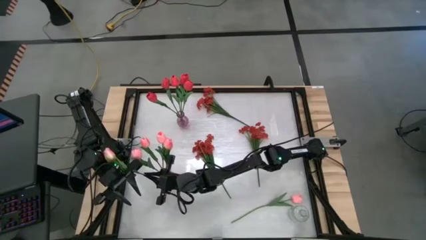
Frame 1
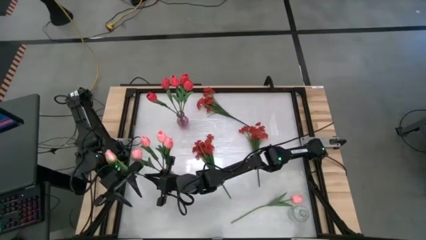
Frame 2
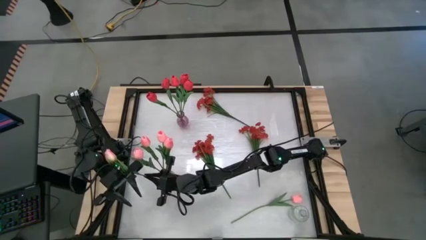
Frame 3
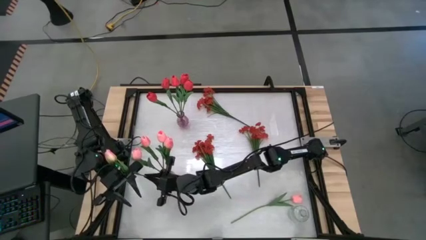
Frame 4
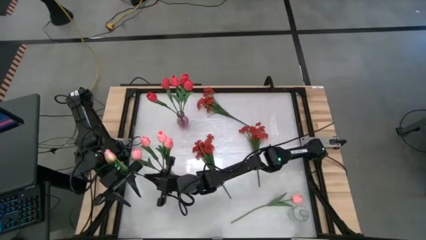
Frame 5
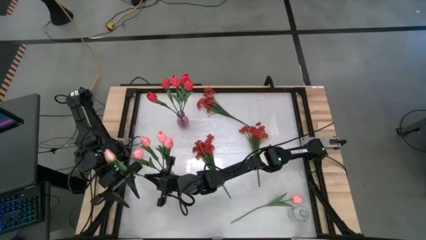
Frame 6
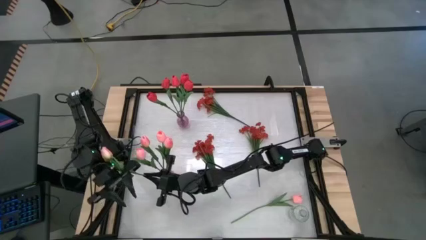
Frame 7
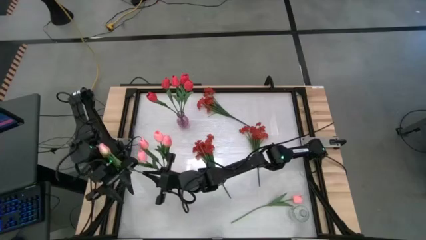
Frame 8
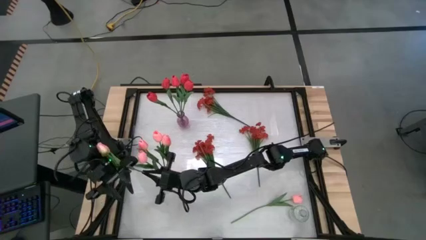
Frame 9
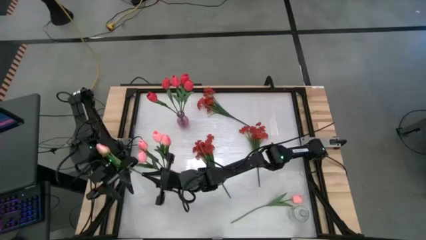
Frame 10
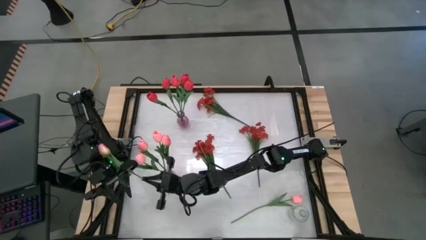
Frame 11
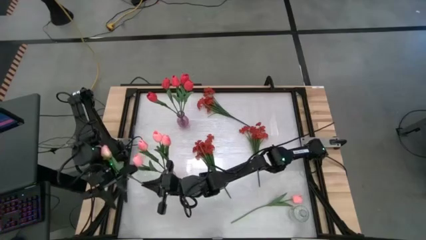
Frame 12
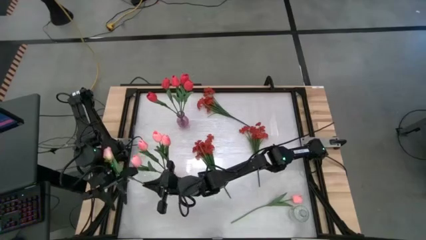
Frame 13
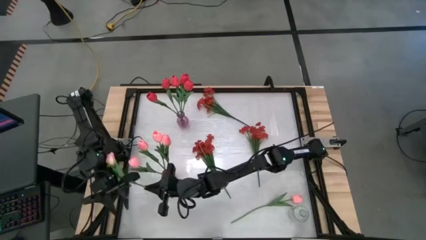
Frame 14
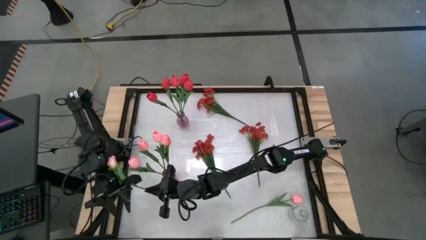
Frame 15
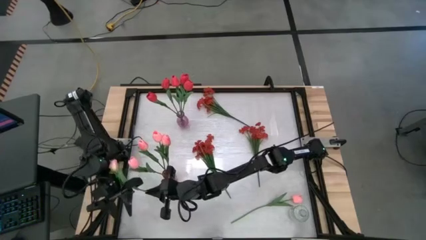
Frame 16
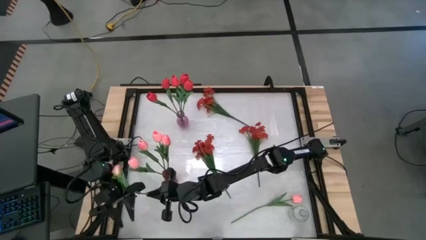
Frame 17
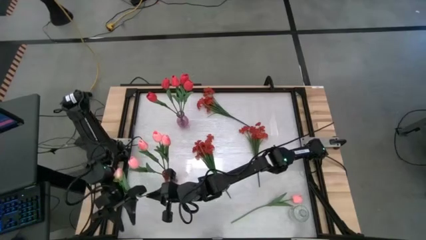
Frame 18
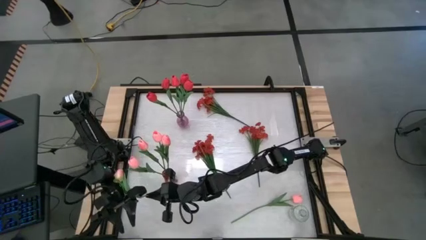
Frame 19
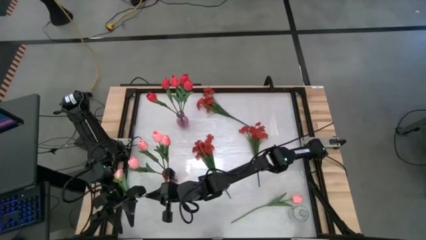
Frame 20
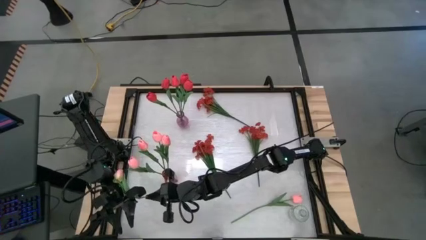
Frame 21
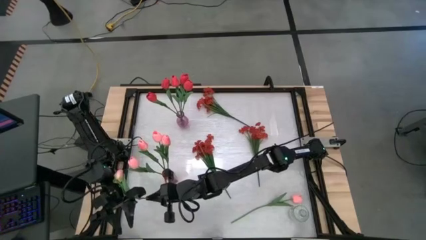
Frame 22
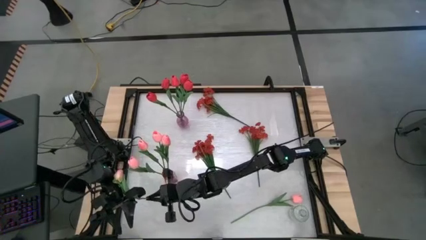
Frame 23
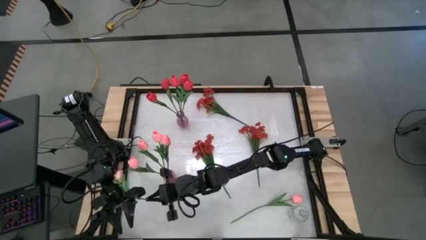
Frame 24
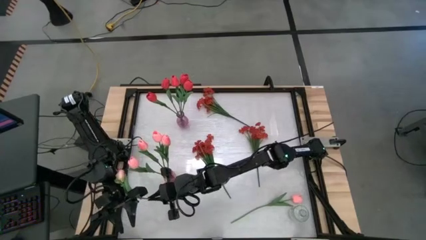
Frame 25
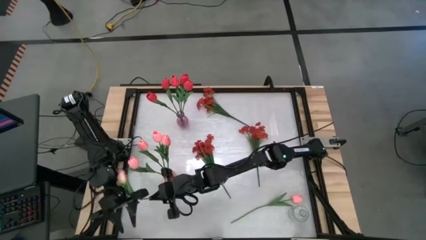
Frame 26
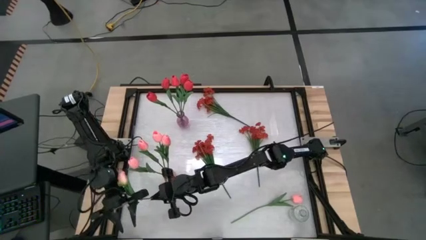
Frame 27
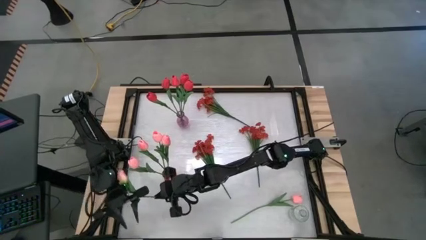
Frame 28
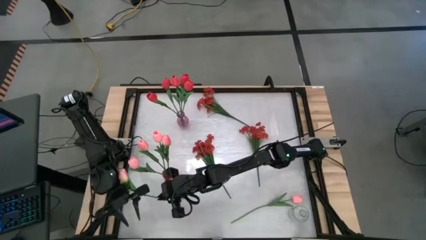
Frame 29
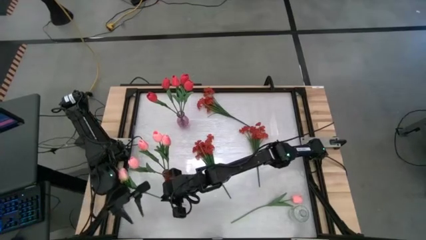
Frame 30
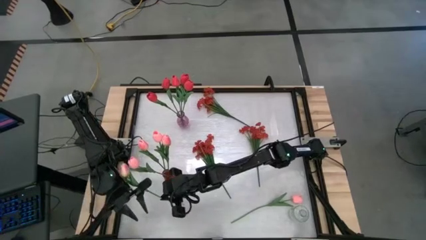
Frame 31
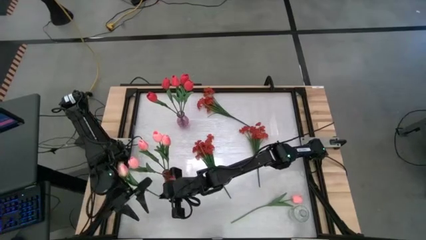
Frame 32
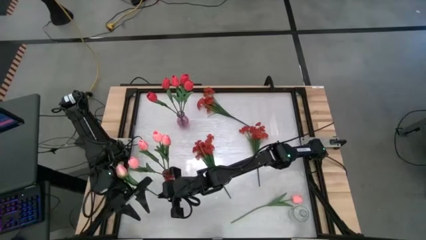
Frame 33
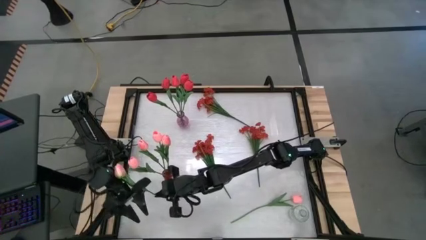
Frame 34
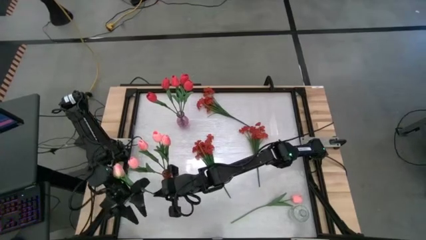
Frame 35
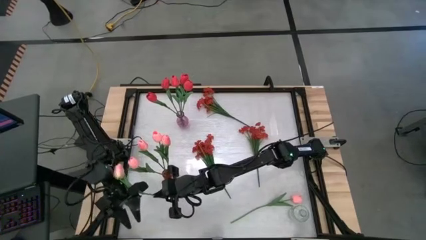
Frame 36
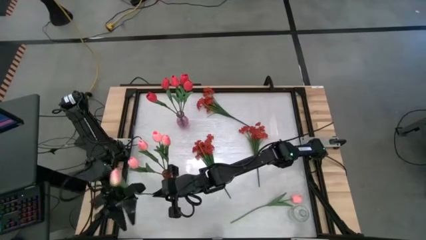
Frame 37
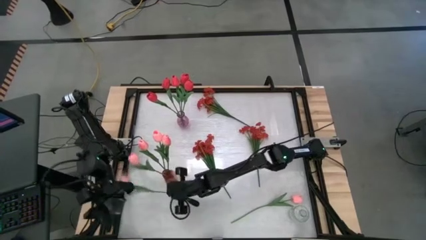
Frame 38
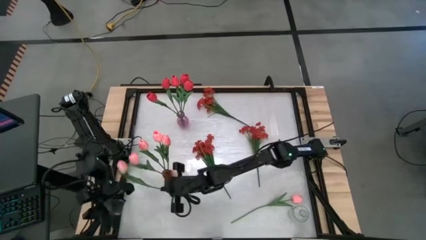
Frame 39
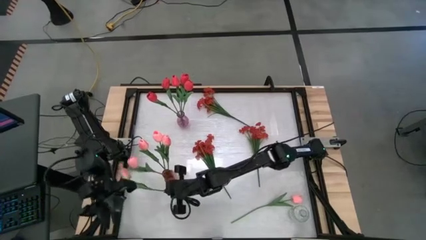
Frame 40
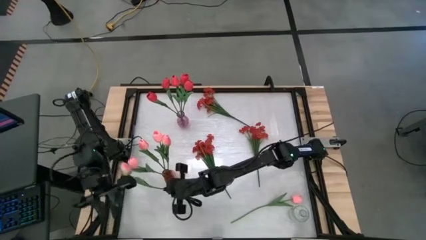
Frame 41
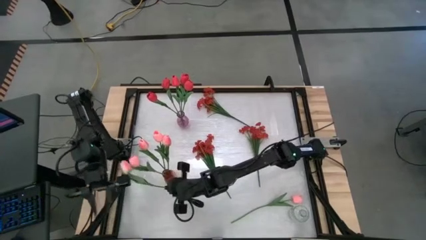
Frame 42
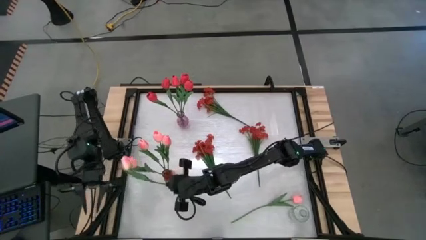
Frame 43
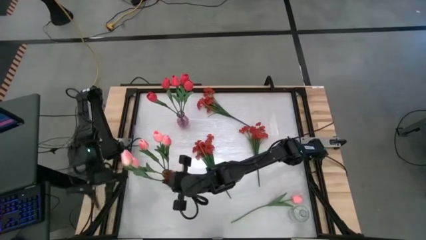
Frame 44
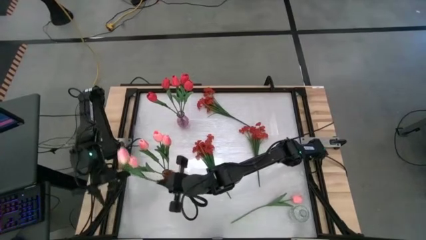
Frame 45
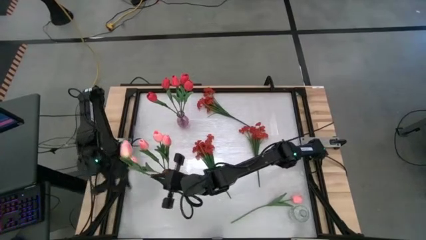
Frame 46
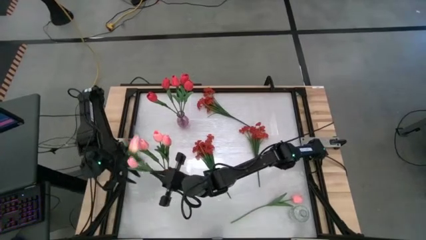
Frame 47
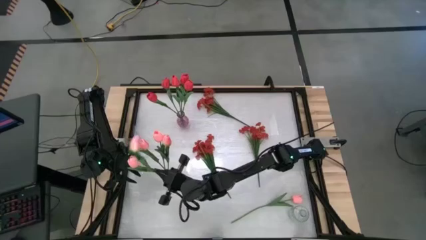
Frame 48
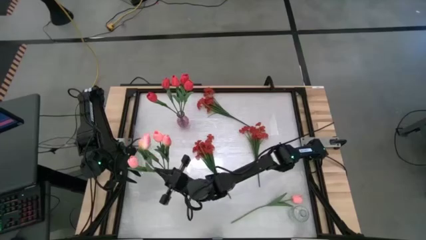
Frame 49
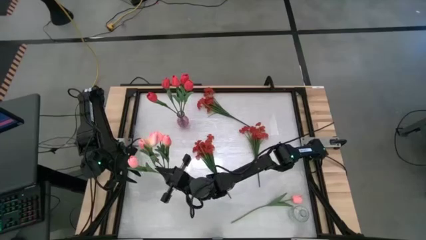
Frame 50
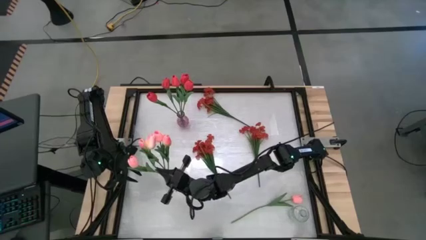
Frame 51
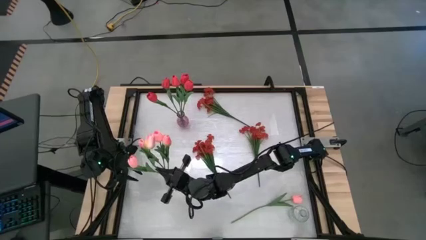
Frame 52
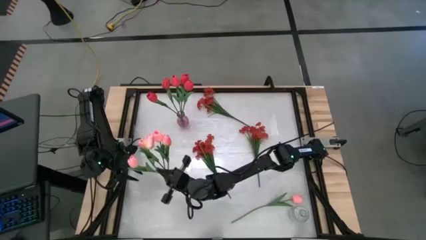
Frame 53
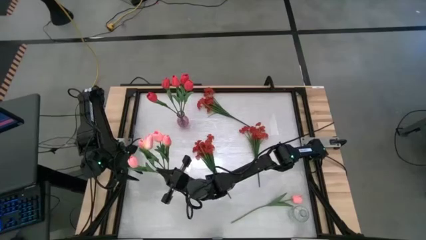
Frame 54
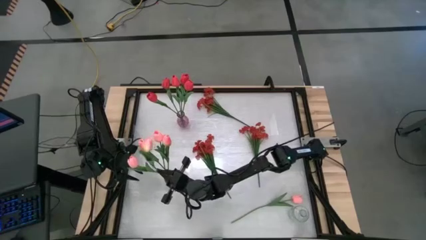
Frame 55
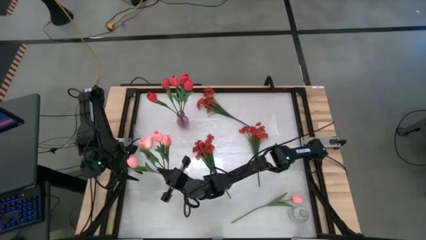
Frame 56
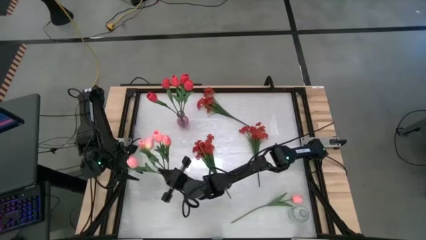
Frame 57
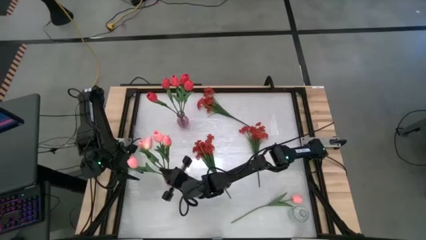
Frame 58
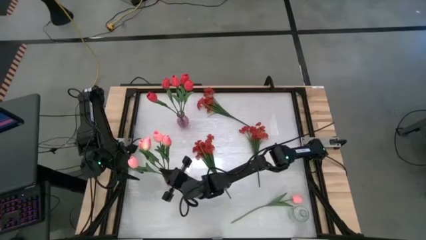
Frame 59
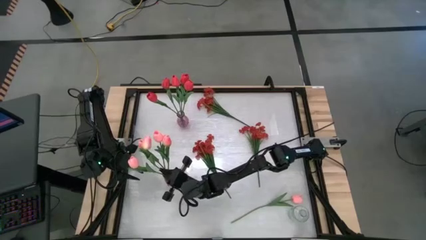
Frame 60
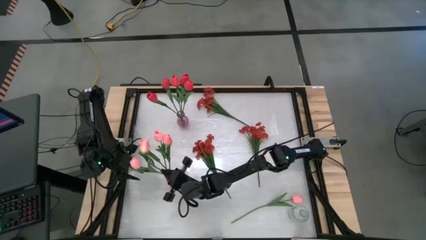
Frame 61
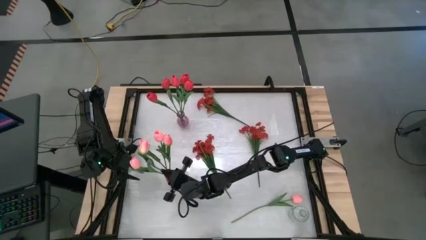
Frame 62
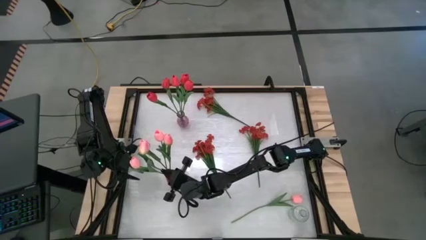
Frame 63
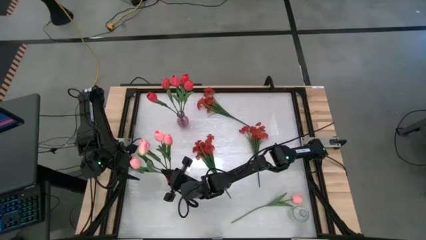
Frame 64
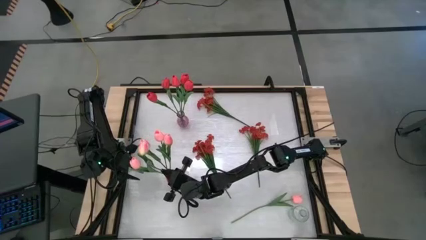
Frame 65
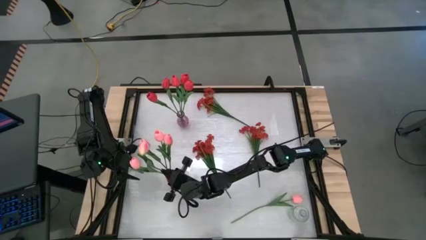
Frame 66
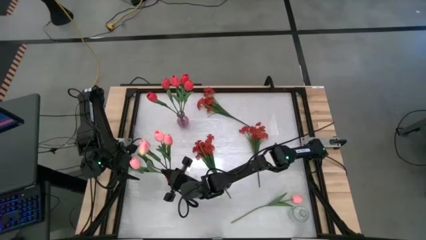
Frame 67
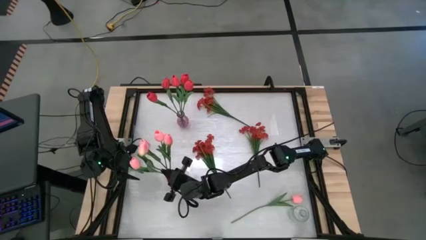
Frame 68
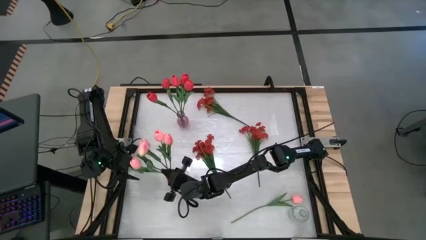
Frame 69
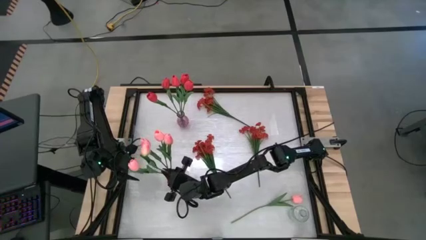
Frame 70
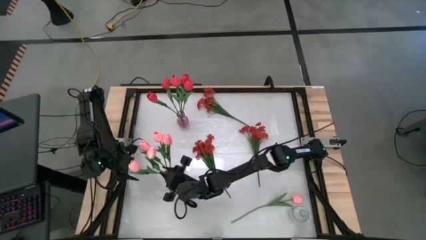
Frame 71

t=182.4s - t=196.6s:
Task: Sort flowers into vase by color
Adjust the pink tulips in the red vase
